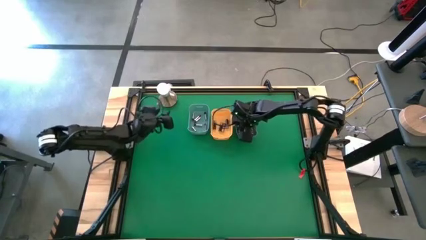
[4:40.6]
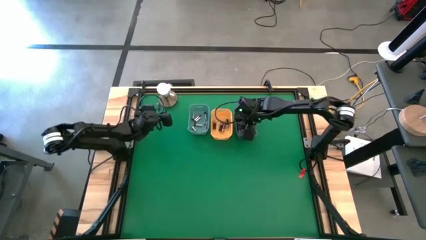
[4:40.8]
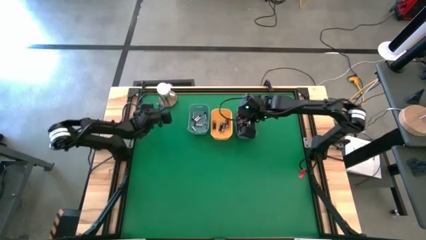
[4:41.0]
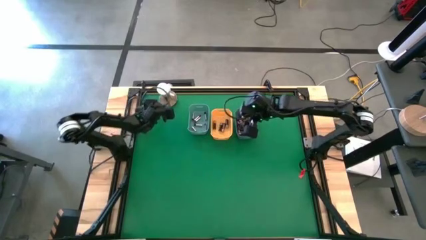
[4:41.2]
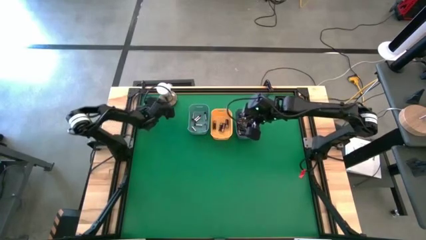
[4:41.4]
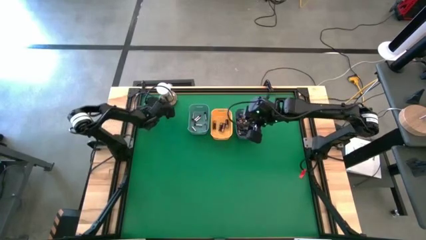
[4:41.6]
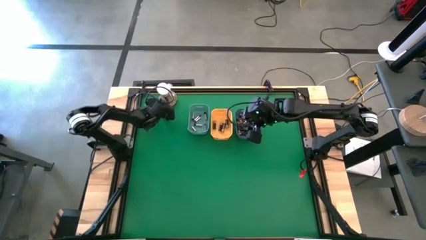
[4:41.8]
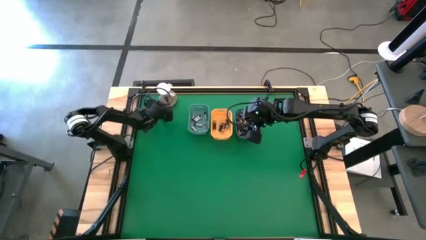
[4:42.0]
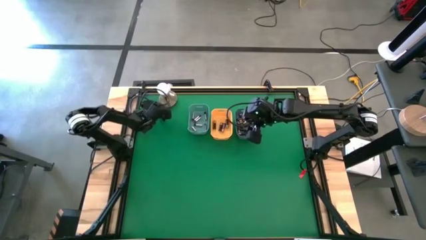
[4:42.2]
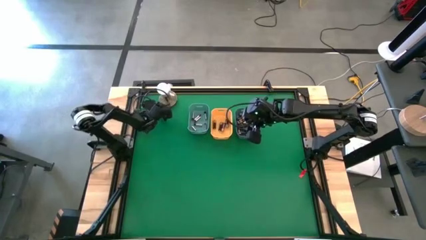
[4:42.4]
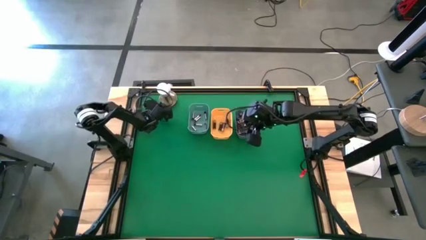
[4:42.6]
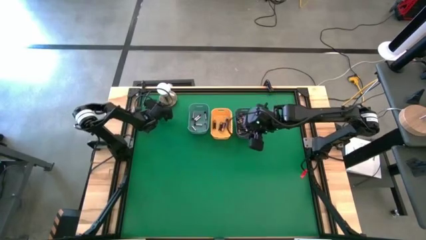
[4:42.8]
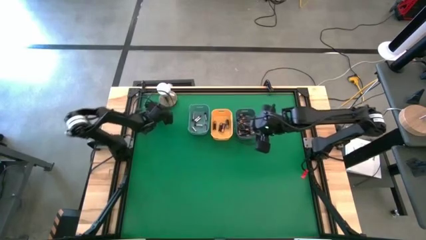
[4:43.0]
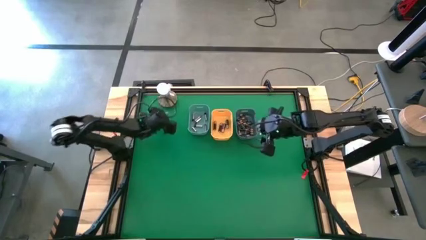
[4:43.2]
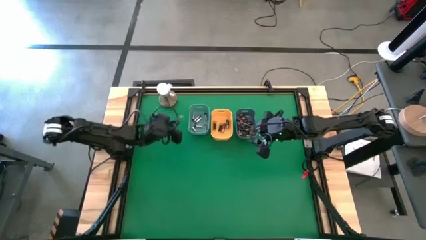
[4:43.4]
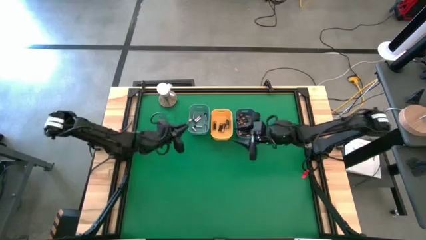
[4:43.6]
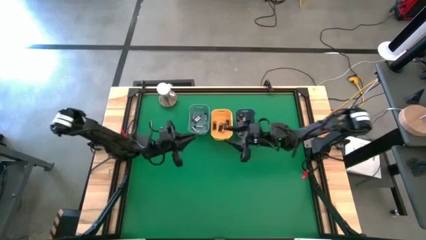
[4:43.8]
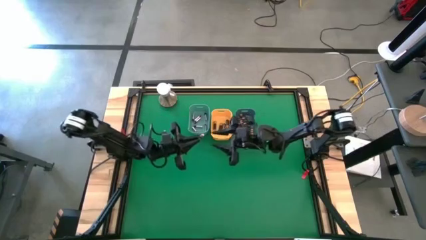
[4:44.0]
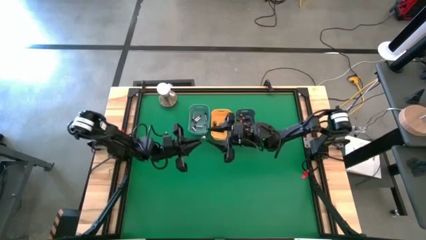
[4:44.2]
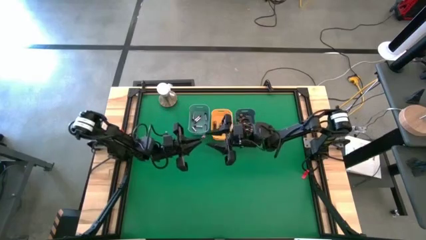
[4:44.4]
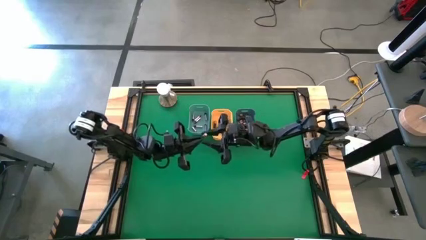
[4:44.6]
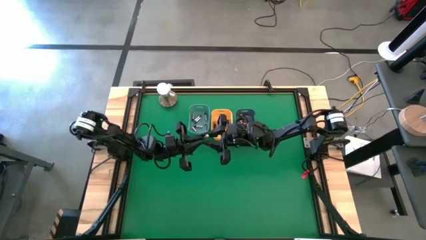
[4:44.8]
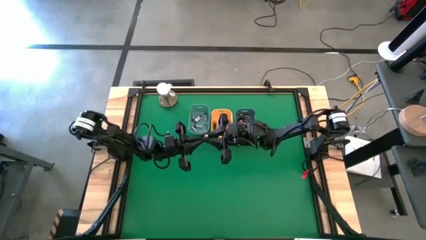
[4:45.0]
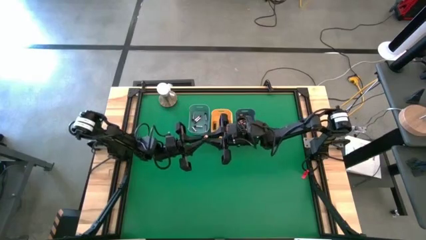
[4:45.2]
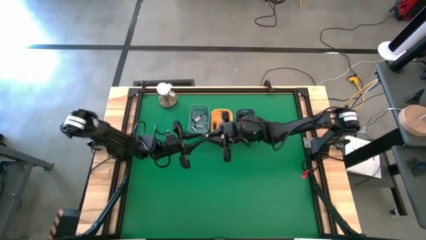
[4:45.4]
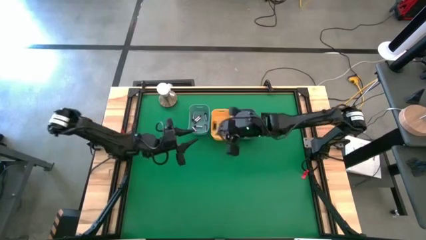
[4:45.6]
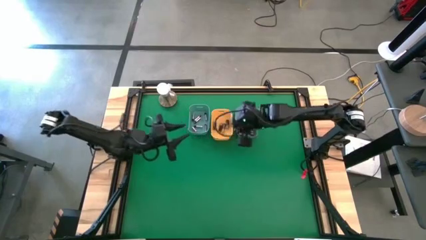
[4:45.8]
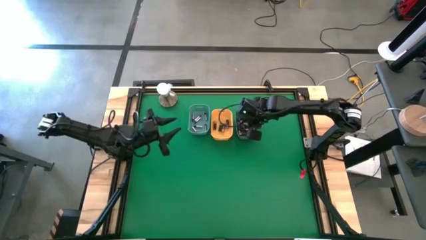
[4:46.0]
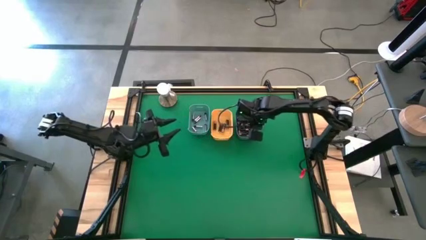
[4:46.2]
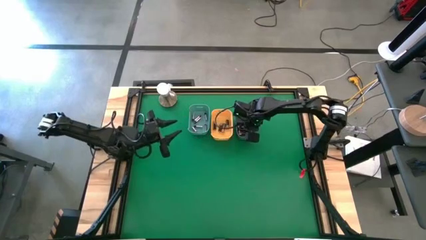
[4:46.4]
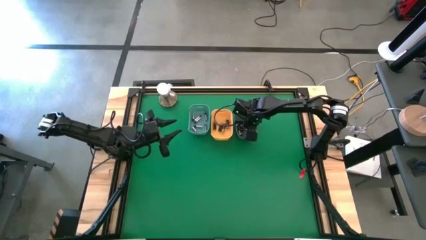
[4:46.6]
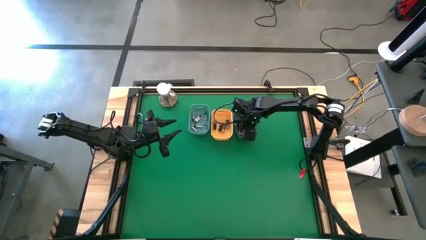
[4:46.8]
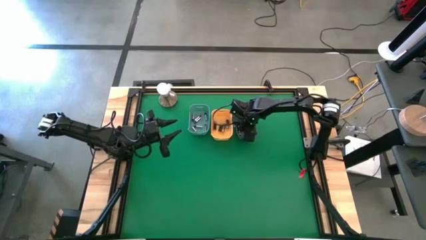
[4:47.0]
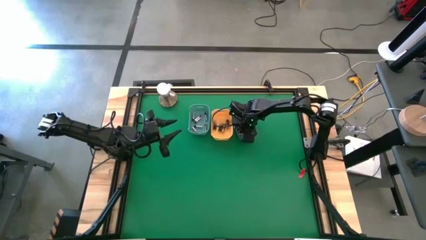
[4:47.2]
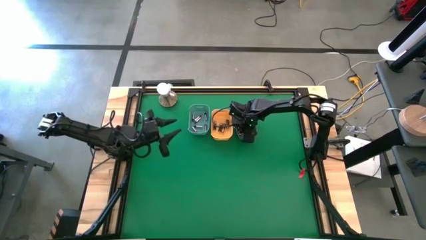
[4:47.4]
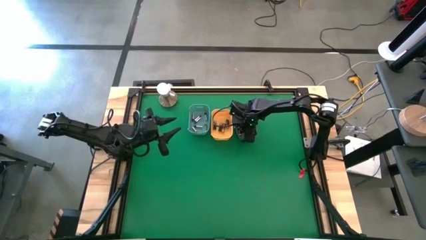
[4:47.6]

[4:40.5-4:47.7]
Task: Sort batteries
Put the small black battery into the blue bin

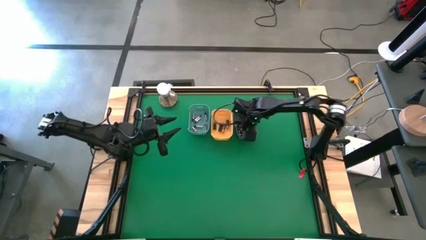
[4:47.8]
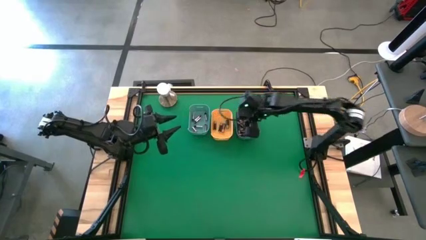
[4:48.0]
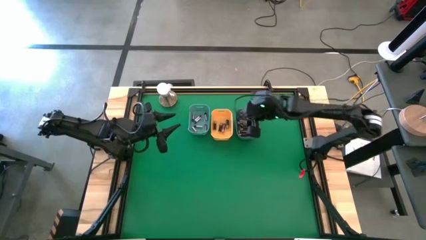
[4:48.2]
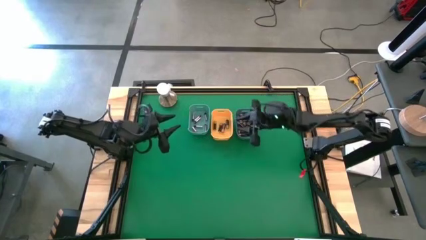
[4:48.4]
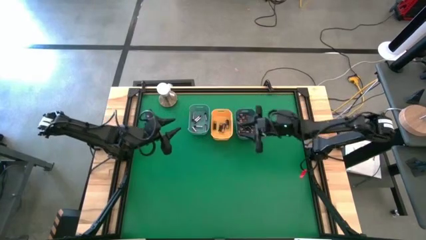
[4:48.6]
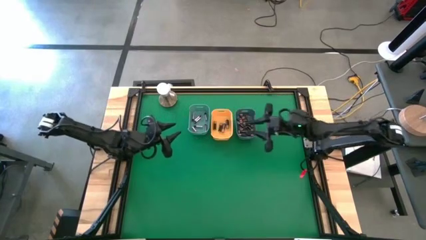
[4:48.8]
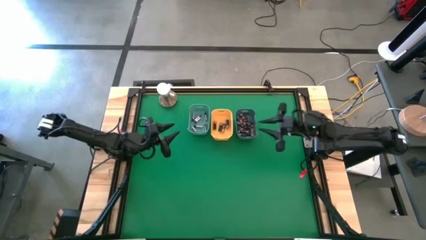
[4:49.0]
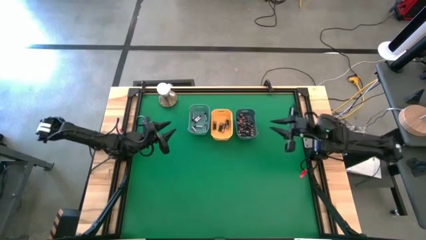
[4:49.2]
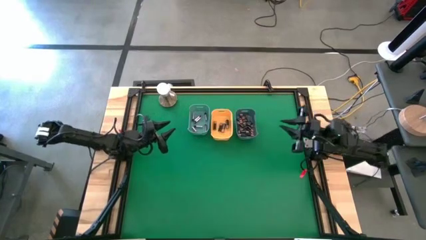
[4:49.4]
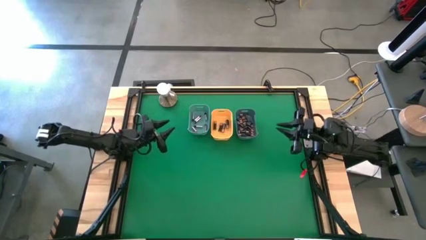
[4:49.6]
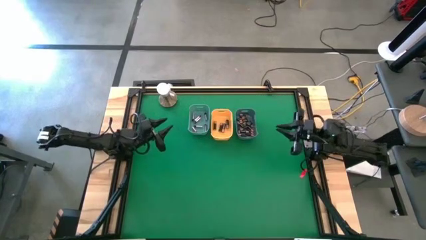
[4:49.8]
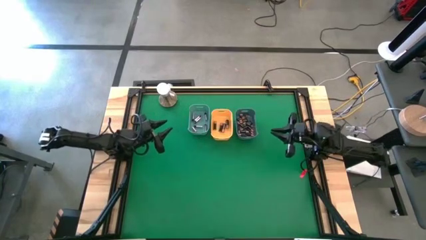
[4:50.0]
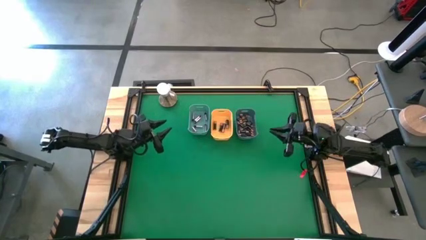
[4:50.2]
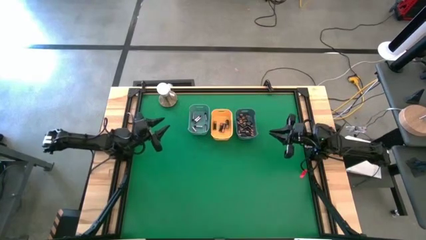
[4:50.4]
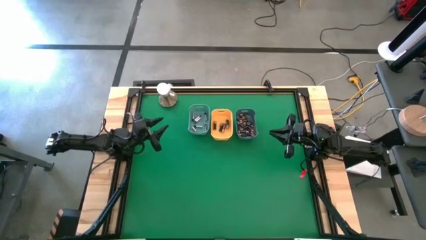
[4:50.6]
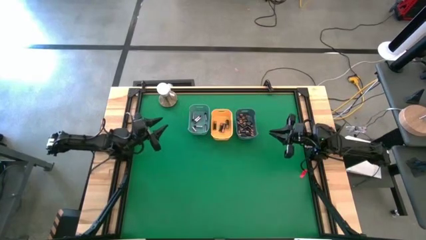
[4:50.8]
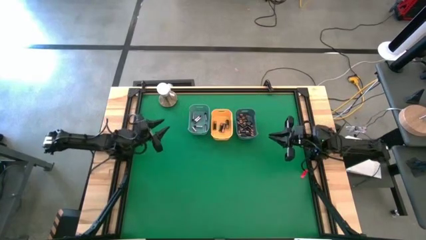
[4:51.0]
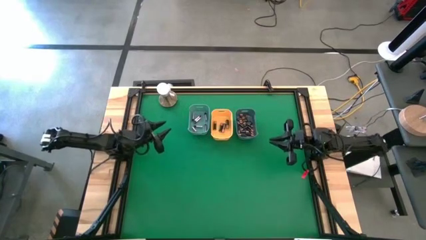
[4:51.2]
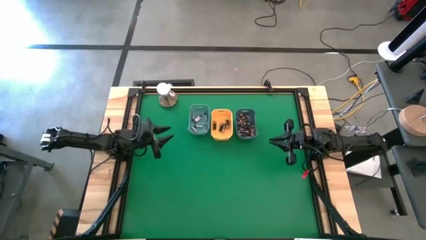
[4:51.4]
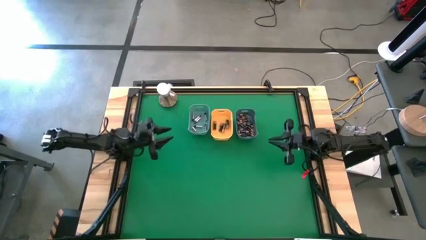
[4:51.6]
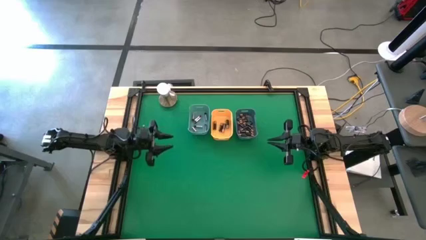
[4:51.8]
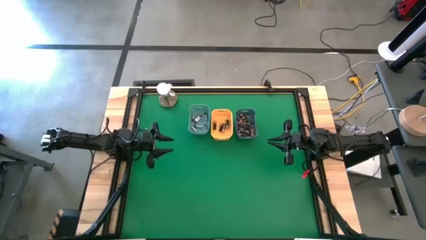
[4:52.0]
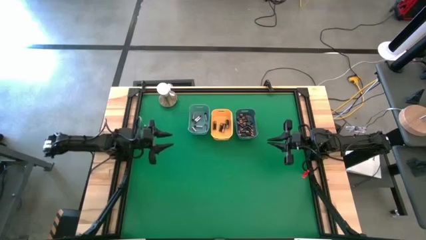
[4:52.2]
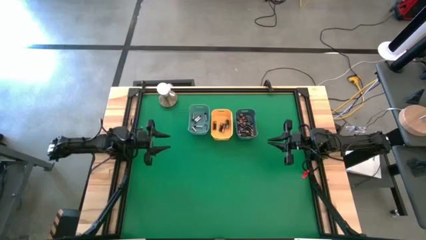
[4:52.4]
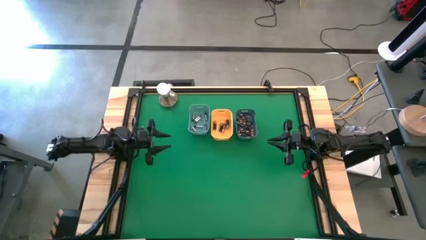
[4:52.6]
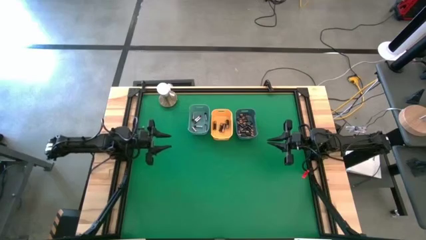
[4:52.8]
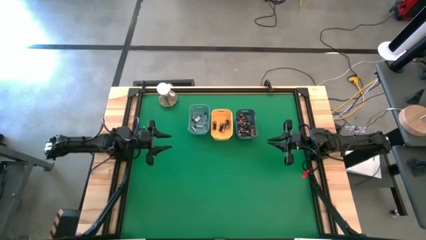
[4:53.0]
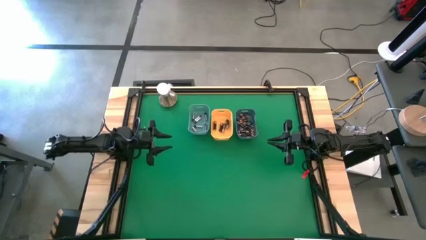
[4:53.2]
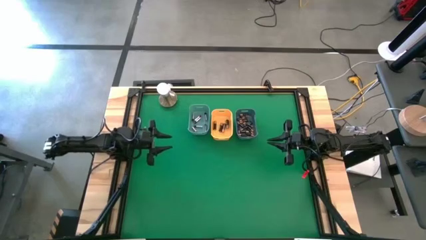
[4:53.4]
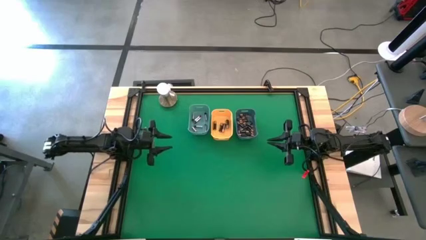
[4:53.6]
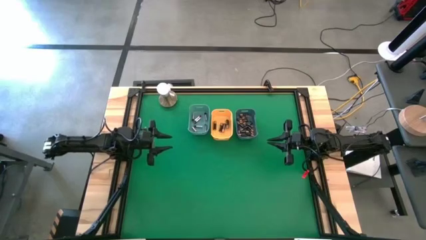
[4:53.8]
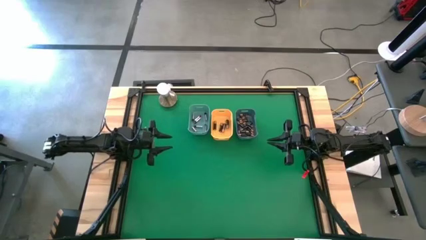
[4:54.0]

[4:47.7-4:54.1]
Return to Home Position
